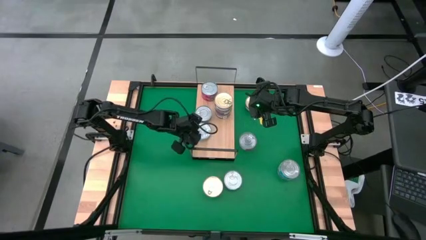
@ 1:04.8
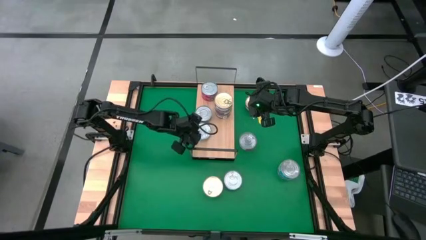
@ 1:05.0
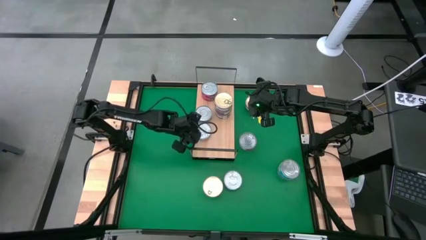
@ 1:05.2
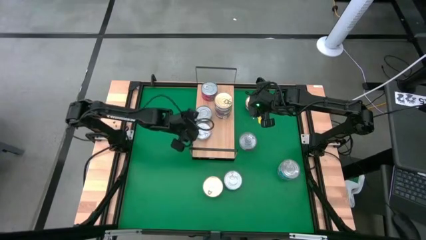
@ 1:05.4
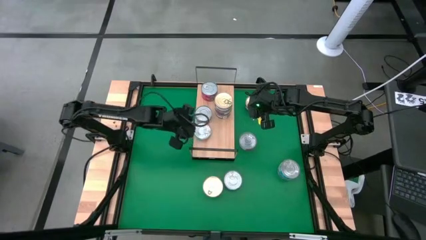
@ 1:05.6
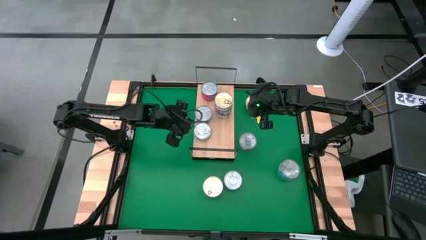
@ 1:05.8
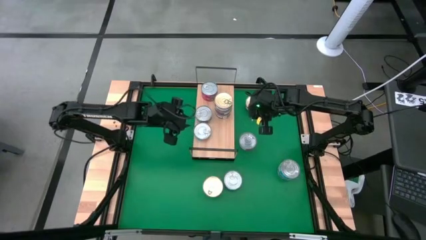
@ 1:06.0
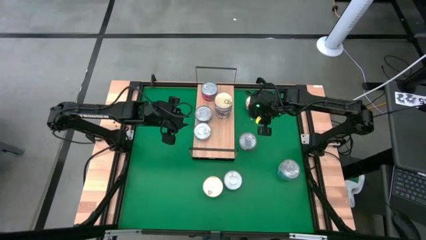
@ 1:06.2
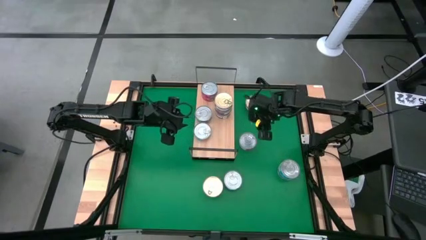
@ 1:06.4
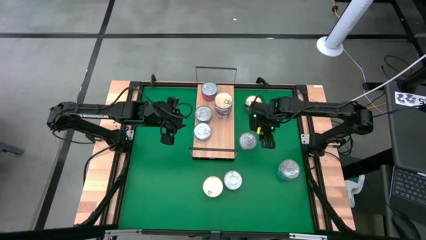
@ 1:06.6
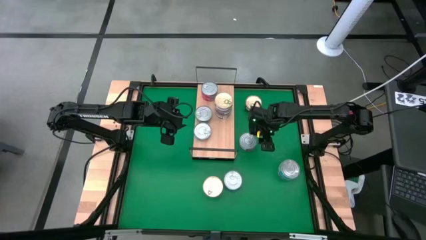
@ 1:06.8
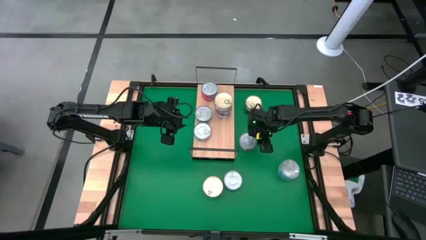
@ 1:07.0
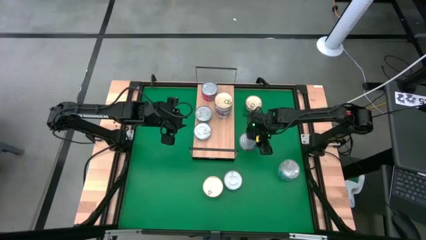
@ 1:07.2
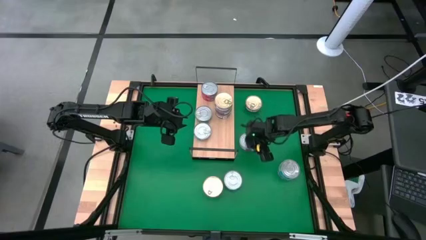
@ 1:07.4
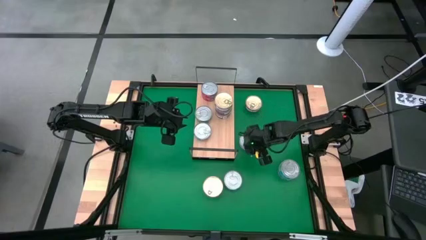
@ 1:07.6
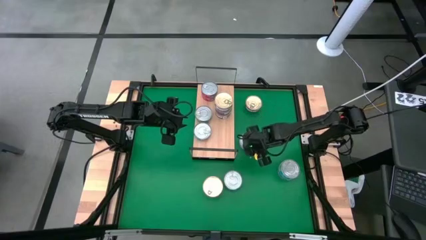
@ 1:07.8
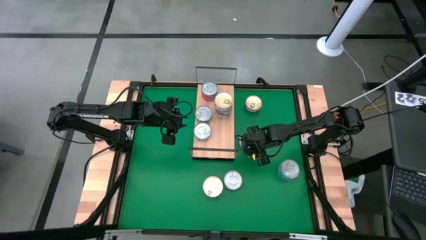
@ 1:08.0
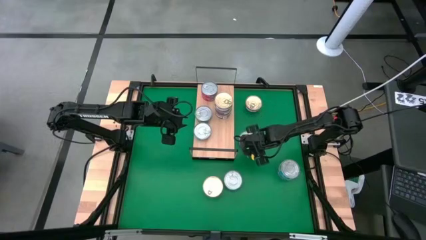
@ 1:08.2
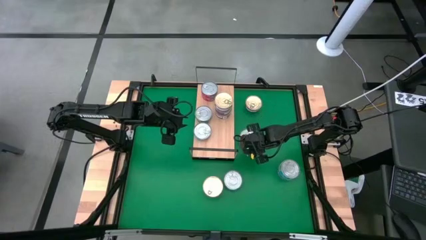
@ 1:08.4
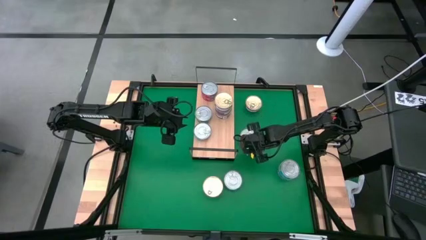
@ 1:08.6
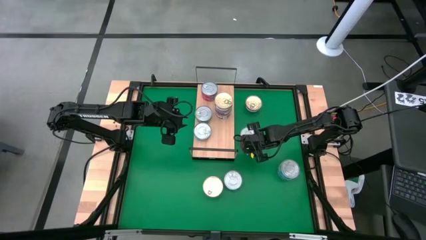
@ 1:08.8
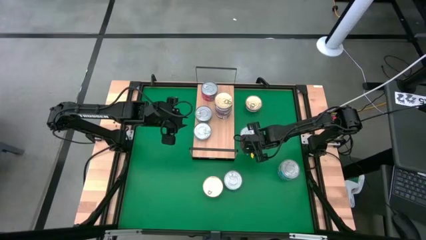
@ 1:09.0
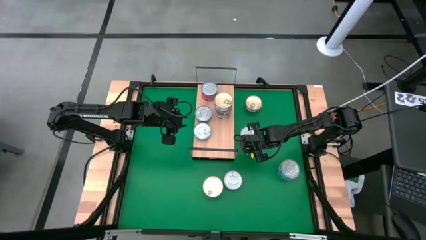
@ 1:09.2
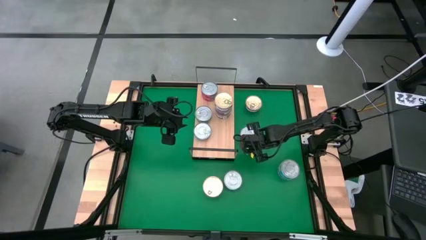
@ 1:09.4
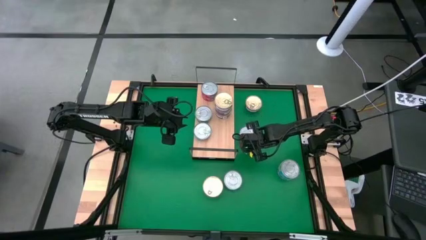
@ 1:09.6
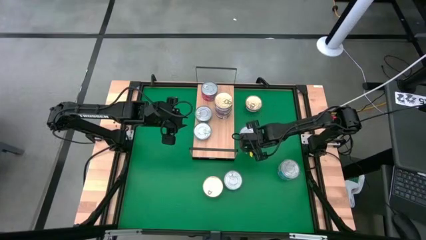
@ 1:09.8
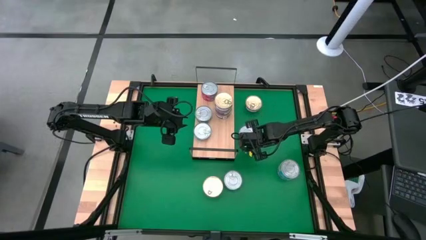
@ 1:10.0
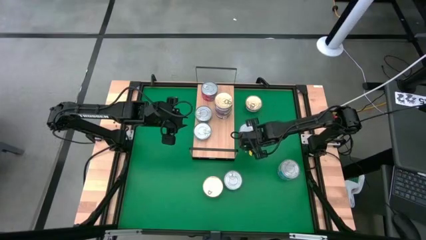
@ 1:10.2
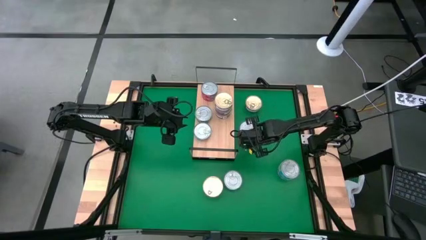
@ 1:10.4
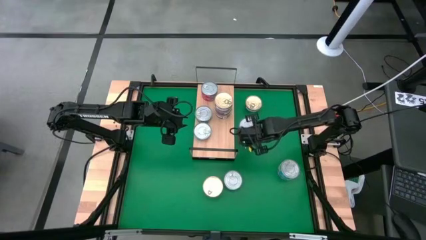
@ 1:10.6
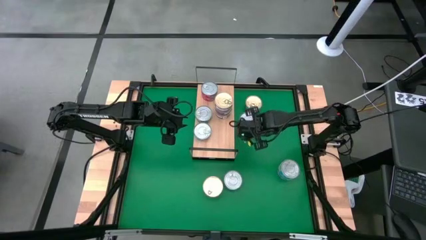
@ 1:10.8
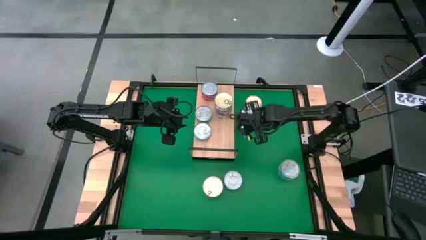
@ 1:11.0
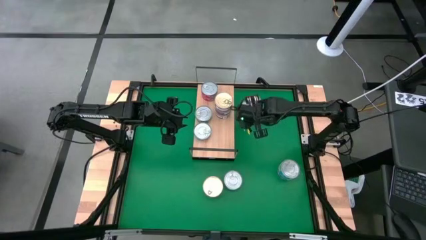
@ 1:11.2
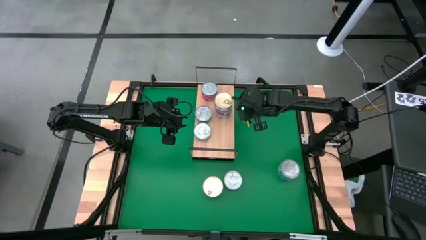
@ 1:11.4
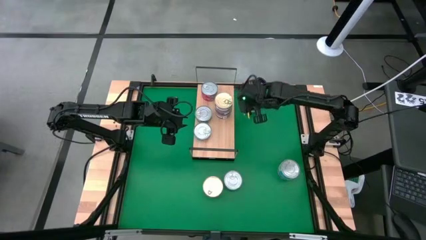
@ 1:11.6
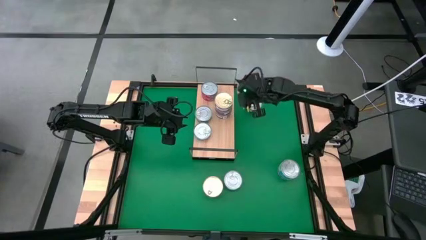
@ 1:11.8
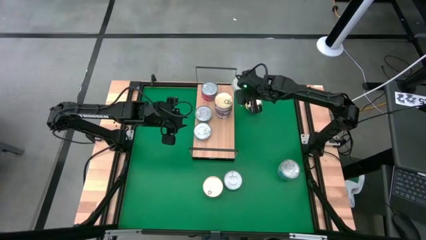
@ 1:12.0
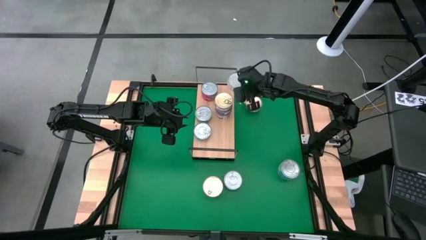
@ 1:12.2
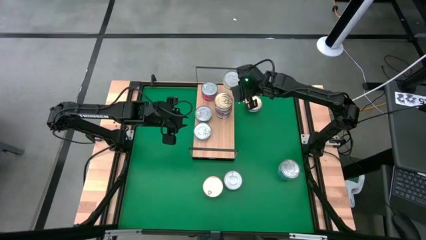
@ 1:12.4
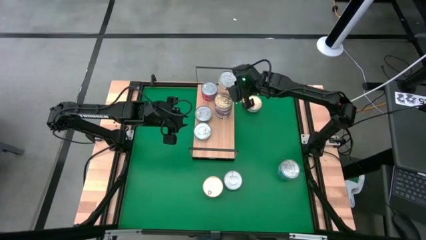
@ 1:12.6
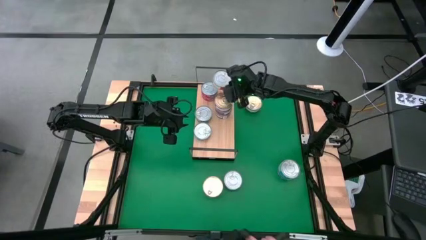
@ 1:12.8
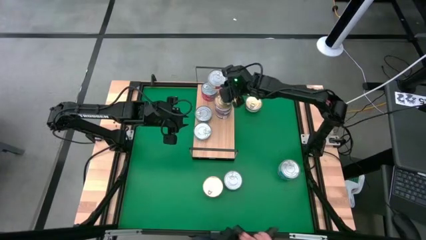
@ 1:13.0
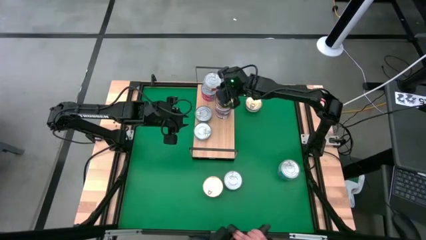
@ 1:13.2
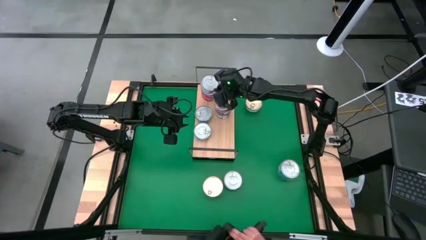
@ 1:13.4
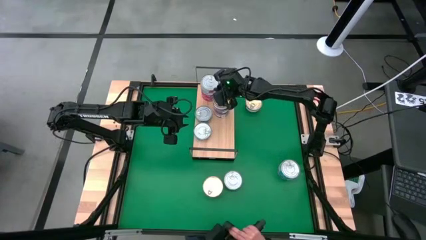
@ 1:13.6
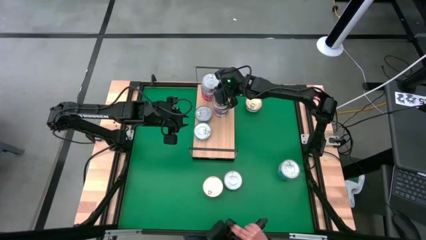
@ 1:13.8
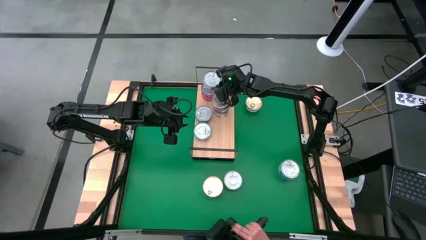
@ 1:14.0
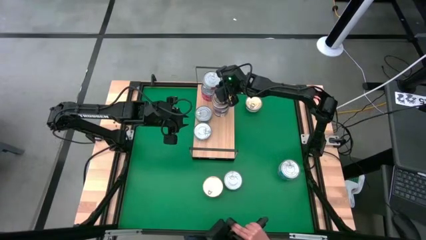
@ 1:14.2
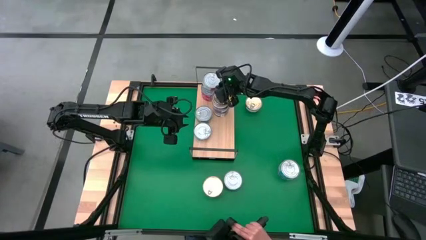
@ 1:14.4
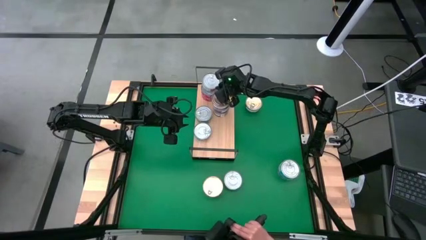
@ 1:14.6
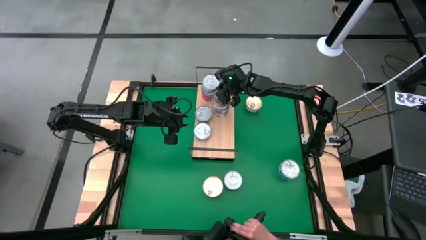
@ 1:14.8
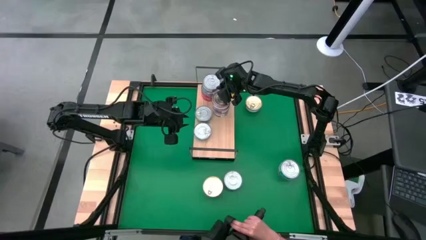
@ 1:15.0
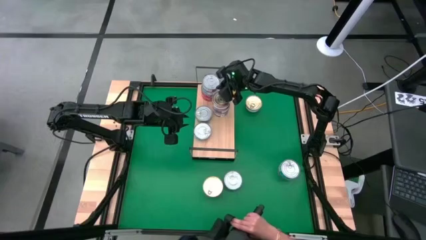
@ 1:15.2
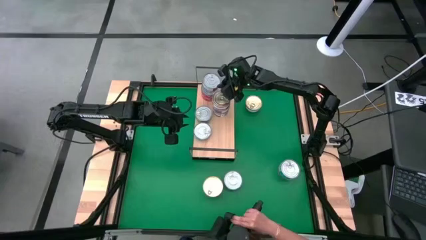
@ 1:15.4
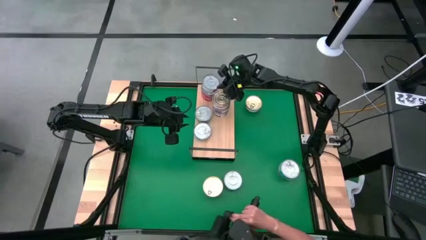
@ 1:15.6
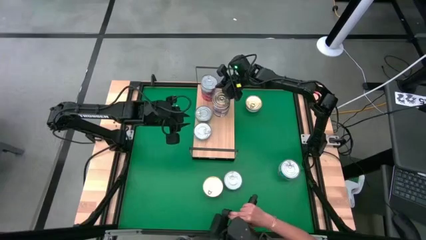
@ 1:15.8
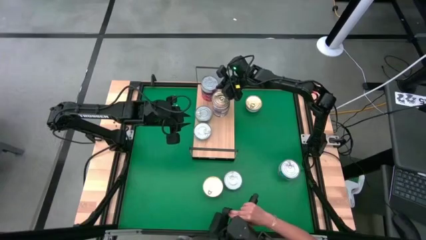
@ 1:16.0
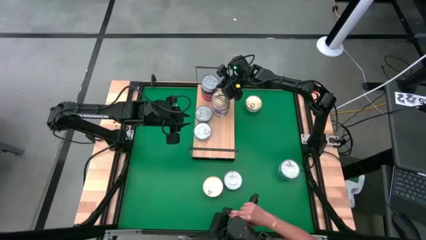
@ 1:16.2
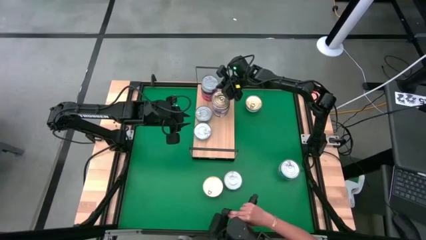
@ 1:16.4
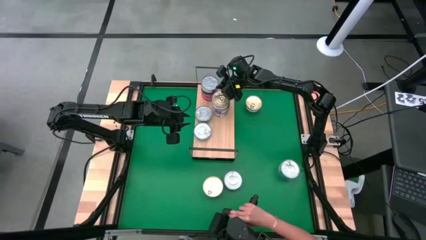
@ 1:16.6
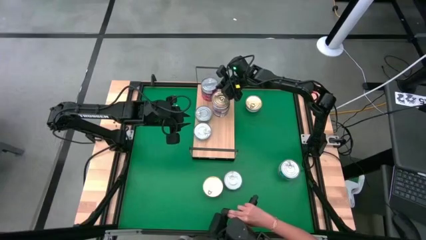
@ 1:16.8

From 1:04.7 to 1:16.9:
Task: Stack canned seafood by type on shelf
Stack the red tuna can on top of the red tuna can on the shelf

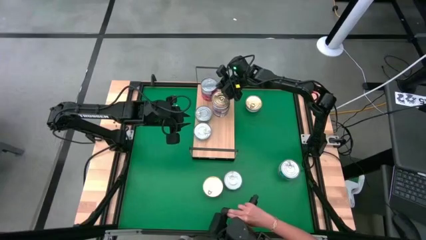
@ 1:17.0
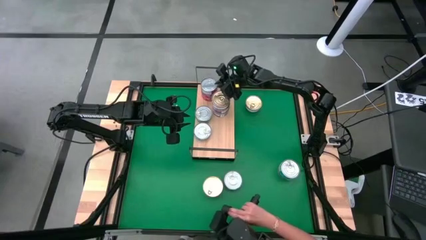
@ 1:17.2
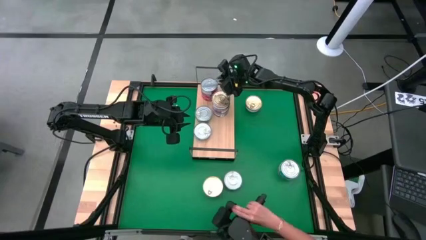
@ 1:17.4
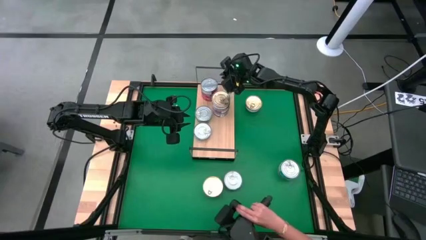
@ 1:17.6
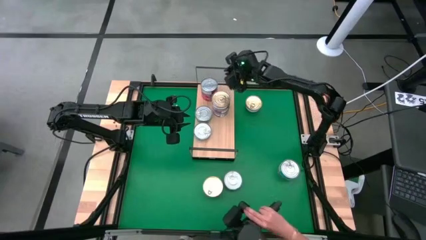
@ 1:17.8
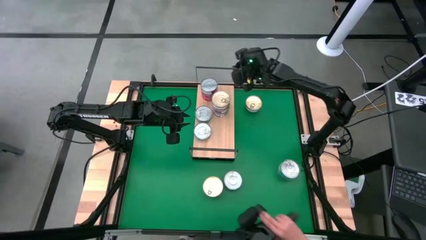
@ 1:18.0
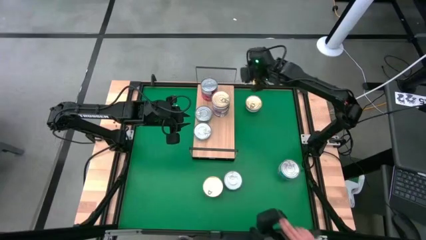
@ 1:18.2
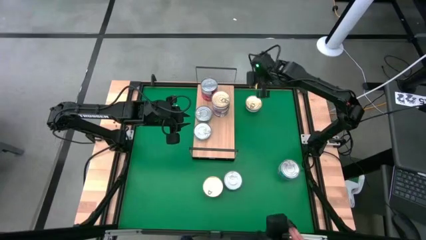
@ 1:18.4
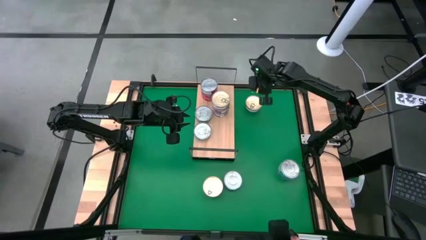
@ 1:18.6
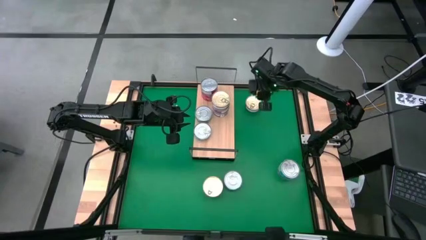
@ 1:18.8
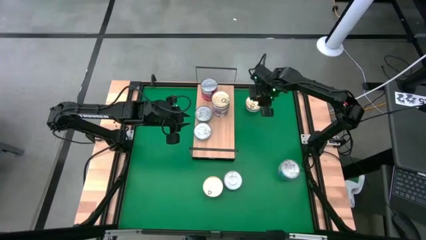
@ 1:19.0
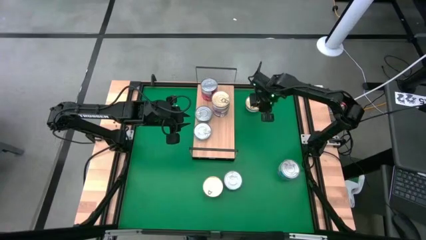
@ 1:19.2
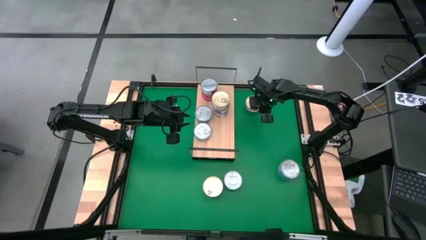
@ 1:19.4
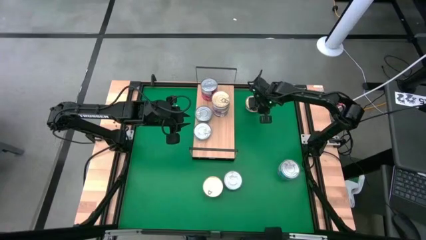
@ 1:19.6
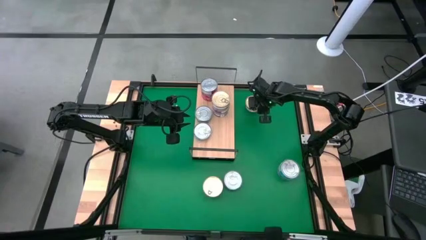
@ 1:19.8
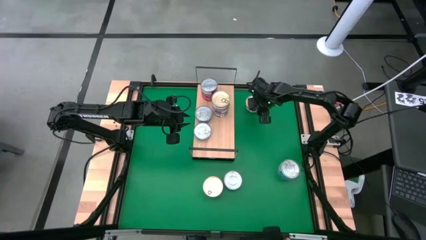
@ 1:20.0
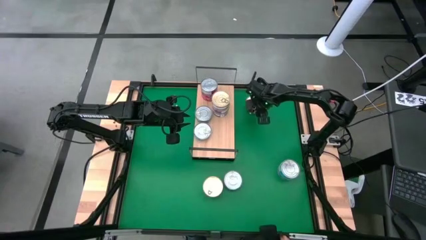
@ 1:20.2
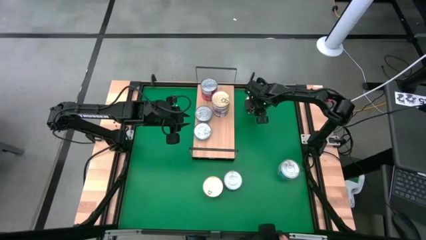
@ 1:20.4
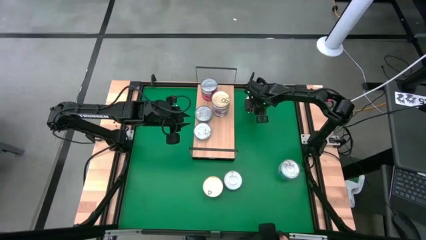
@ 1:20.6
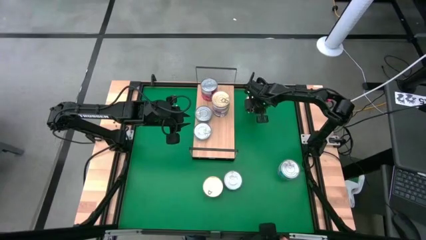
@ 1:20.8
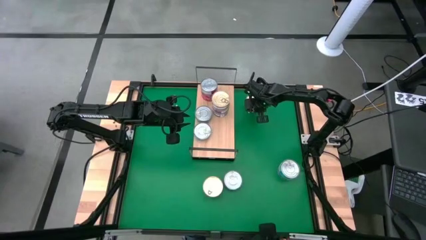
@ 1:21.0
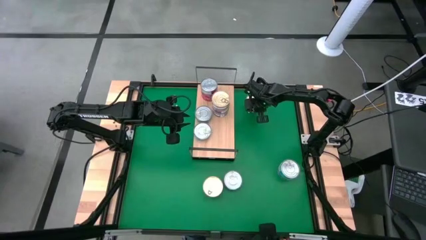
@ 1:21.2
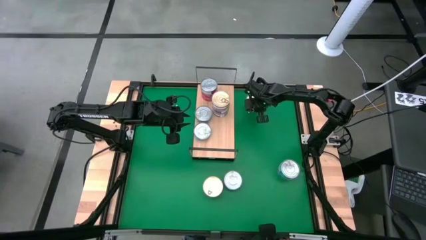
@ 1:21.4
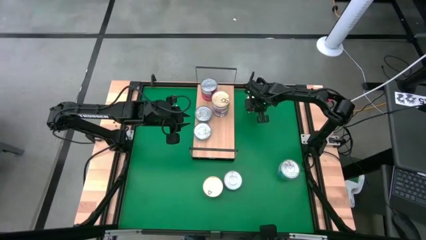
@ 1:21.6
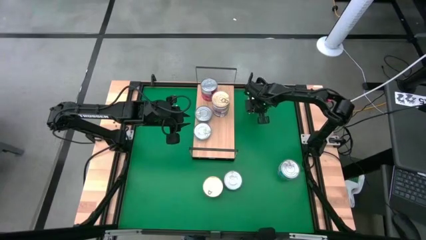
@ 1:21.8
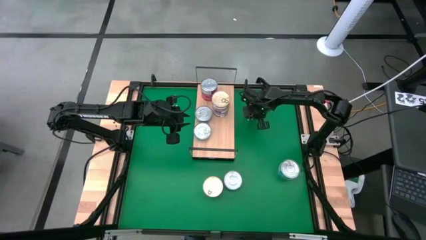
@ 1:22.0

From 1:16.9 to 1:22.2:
Put the dark blue tuna can on the shelf
